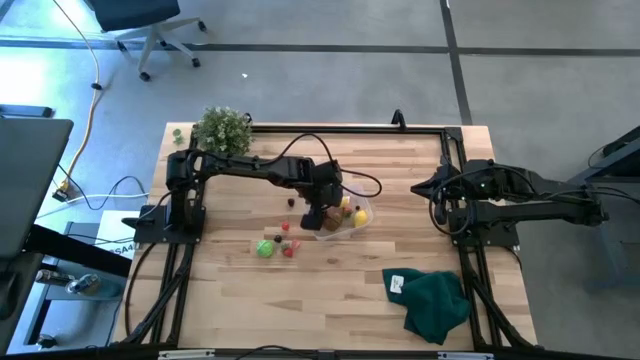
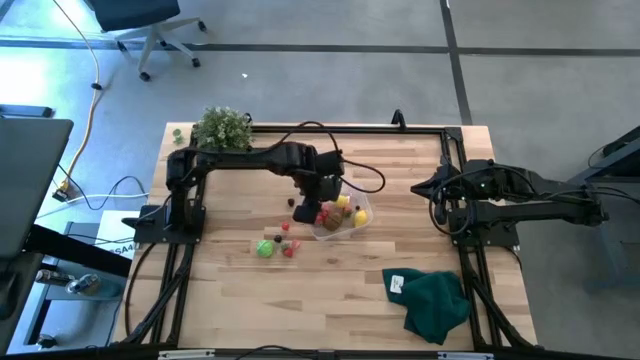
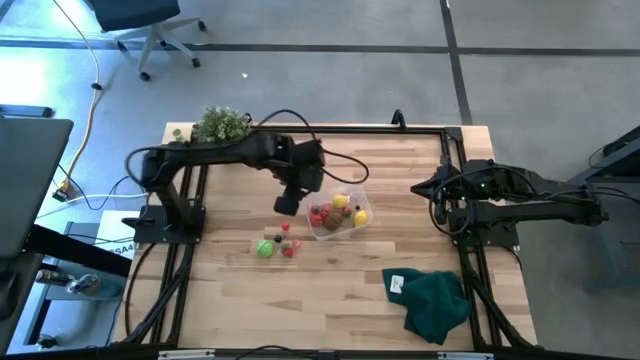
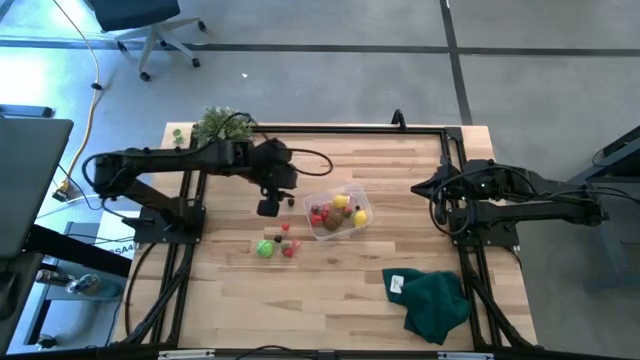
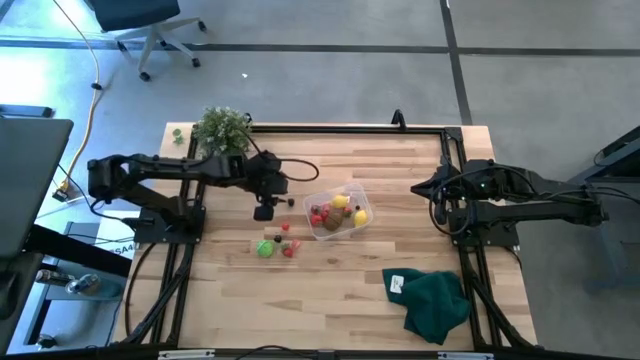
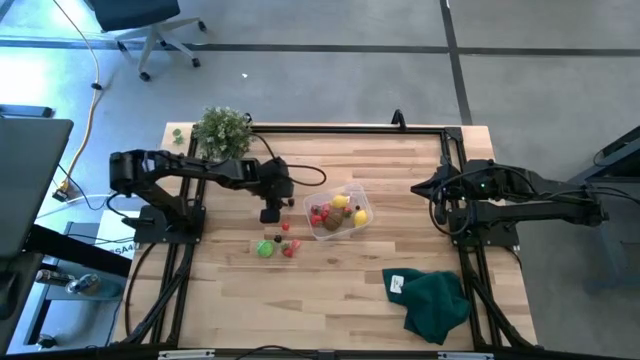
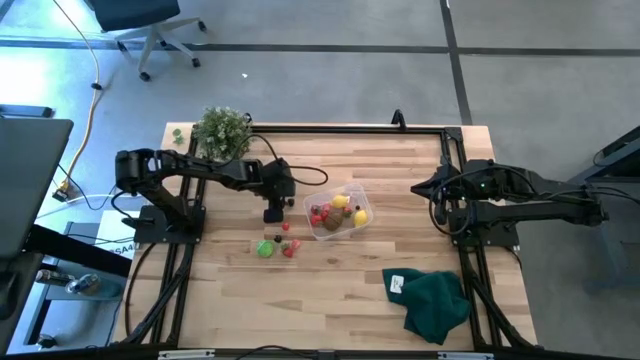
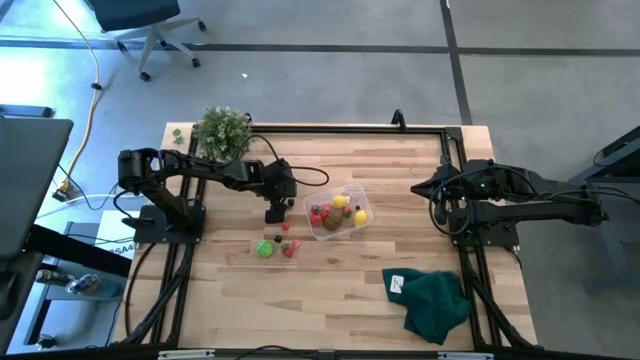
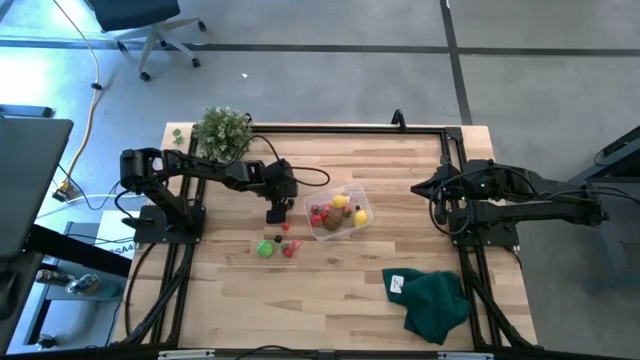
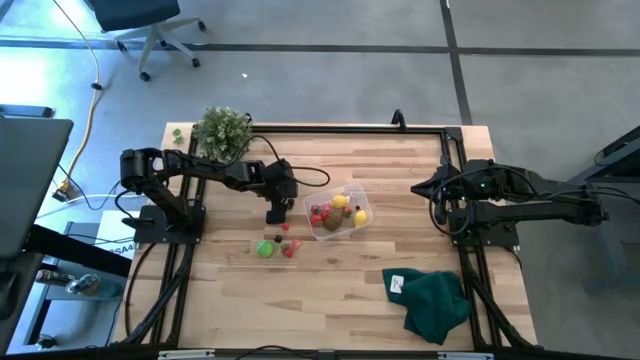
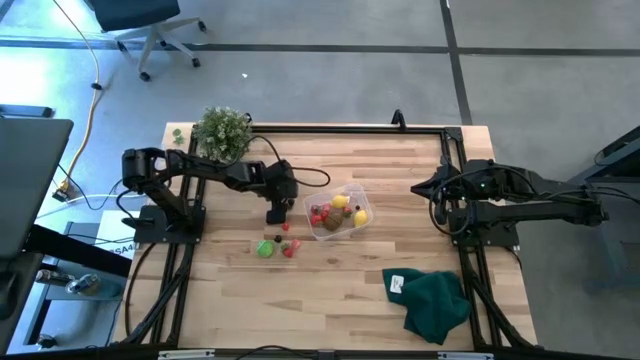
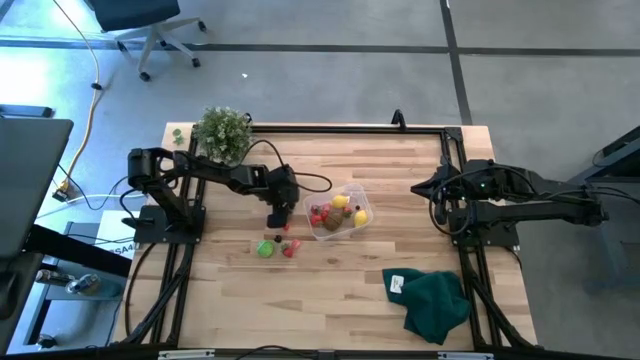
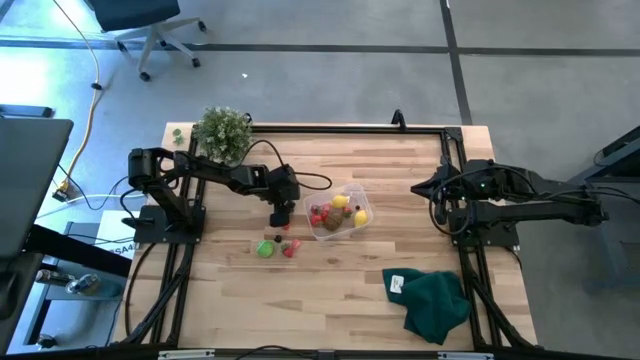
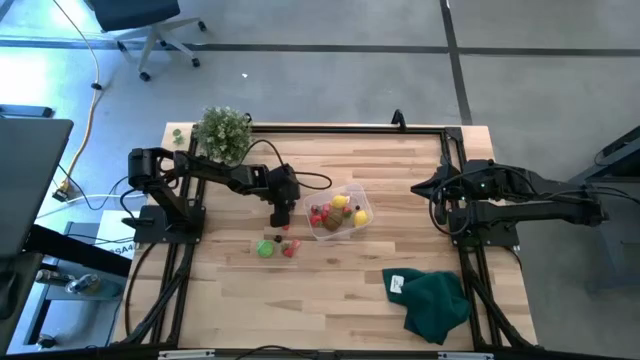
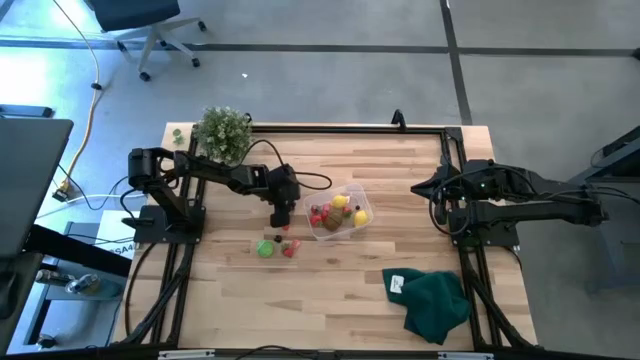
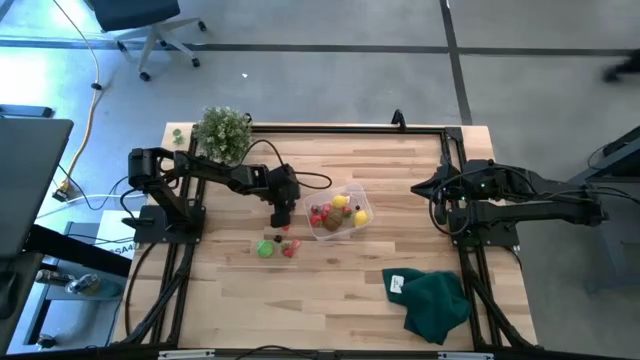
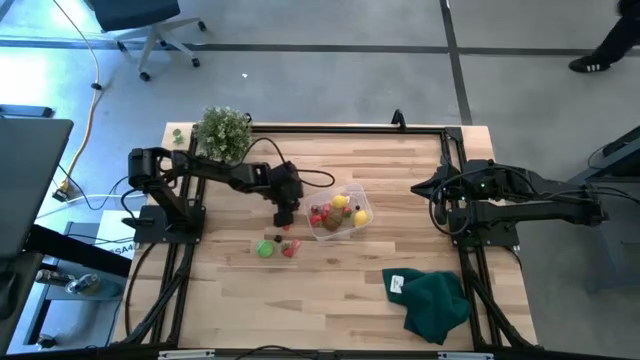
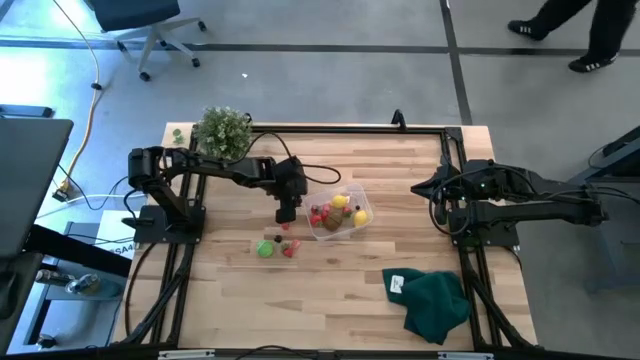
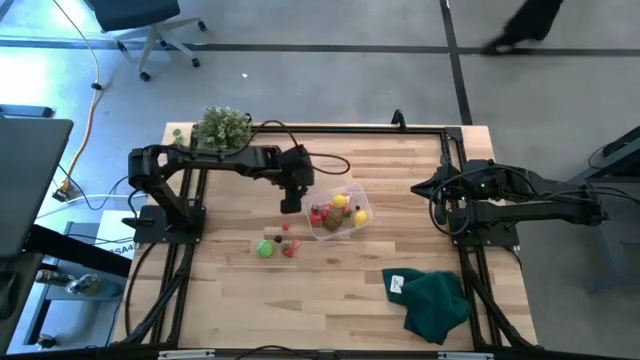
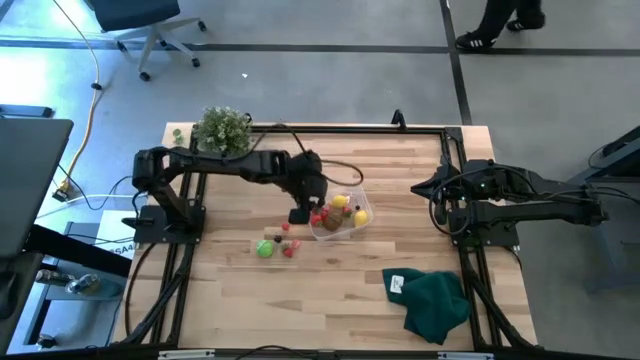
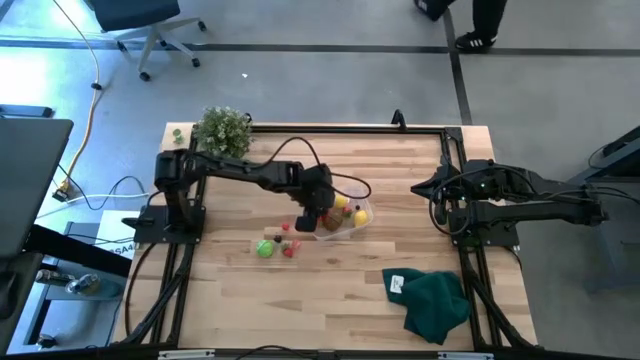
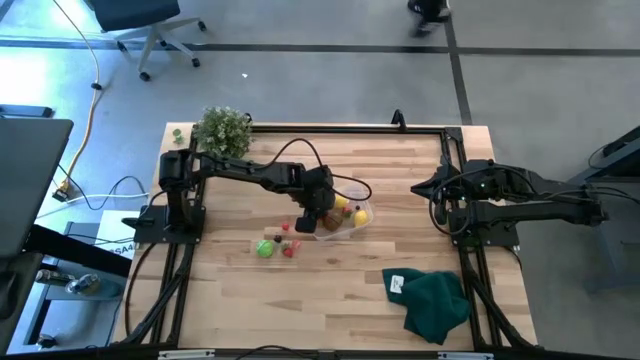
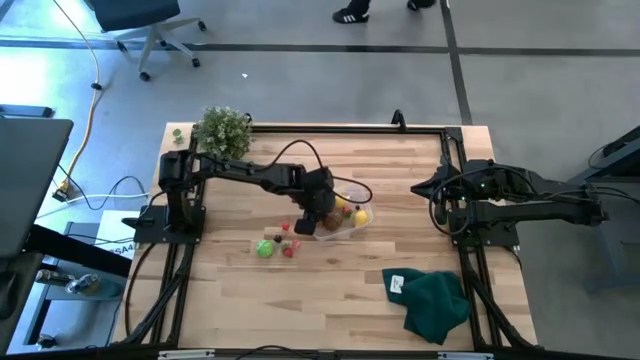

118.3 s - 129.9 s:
Task: Pick and placing Produce into tupperware
Put the blackberry into the transparent bin

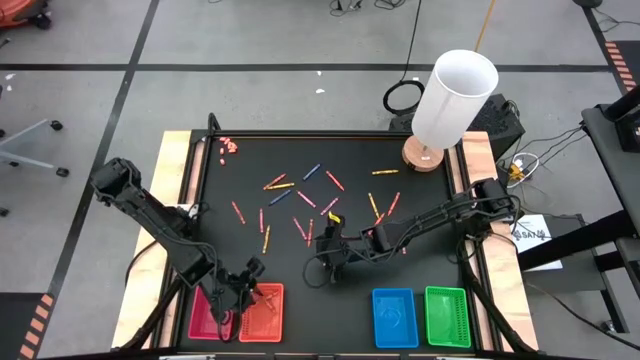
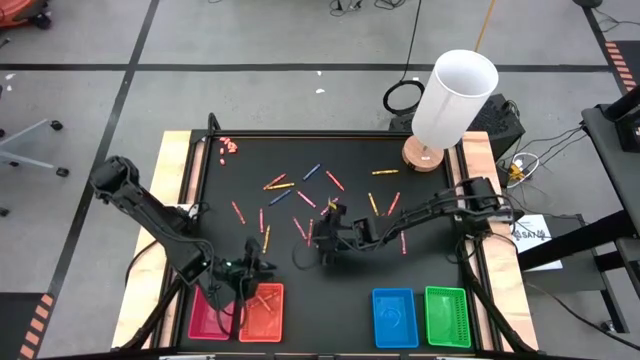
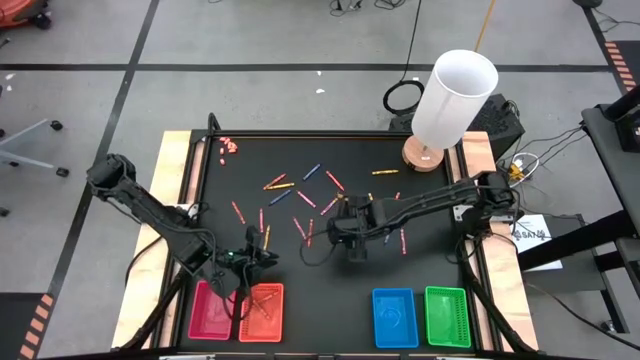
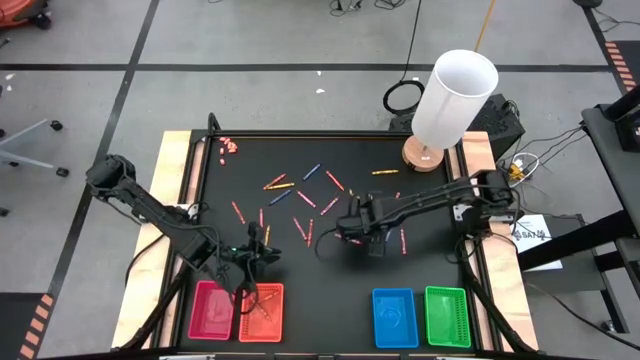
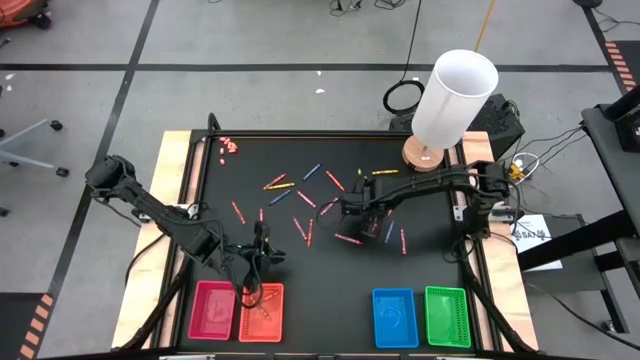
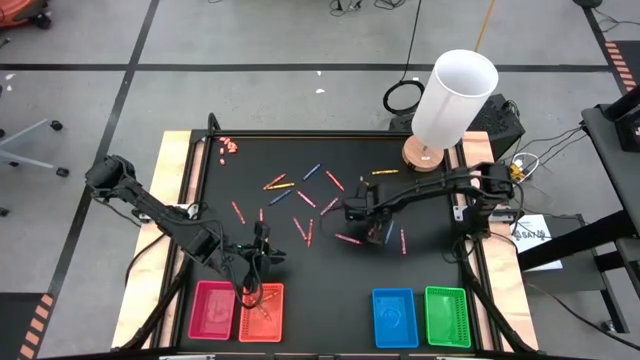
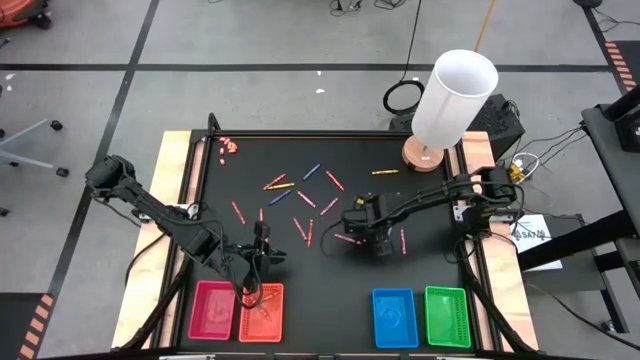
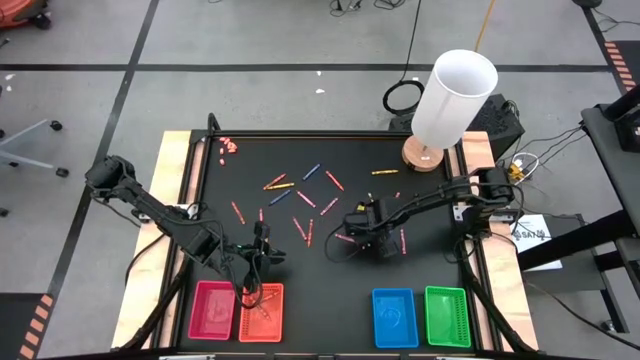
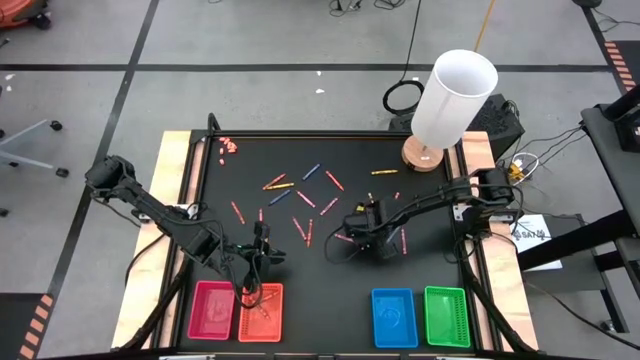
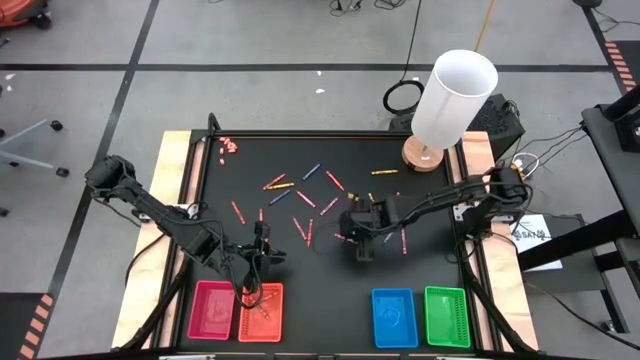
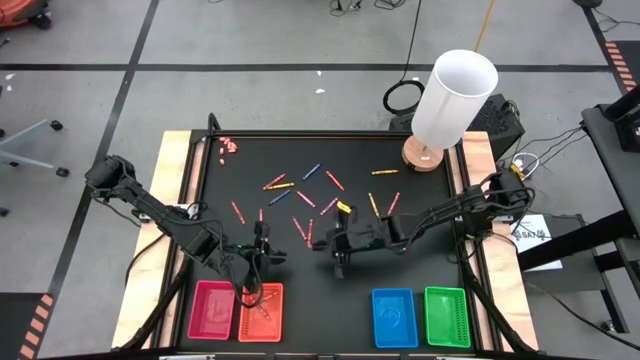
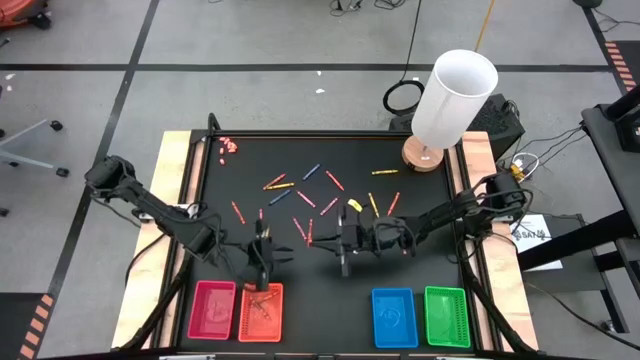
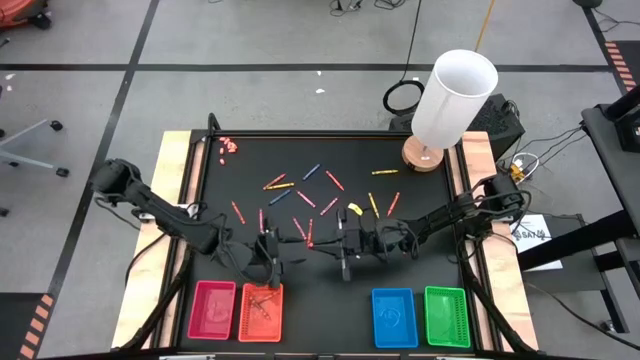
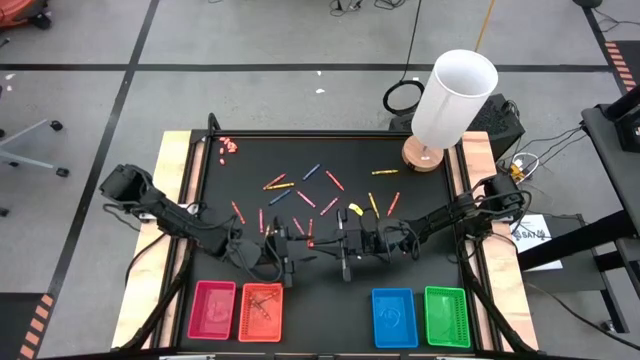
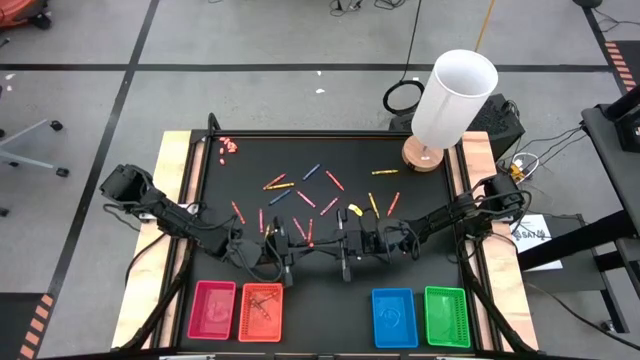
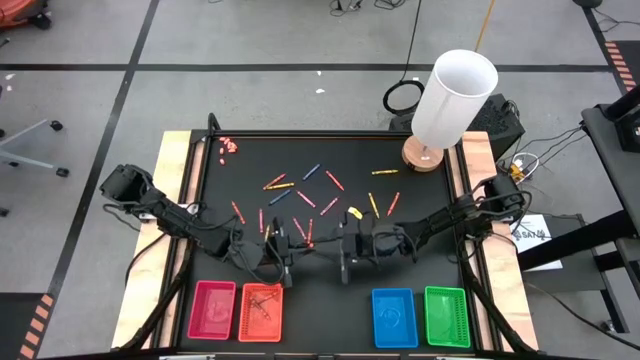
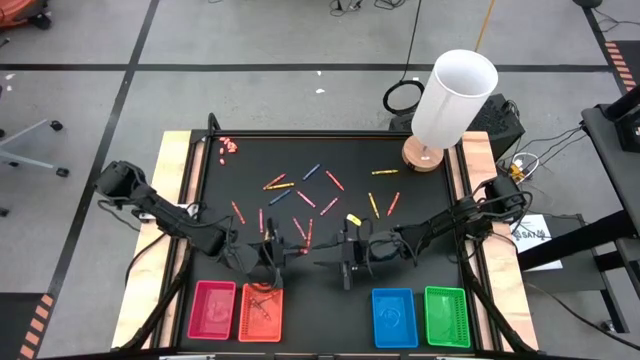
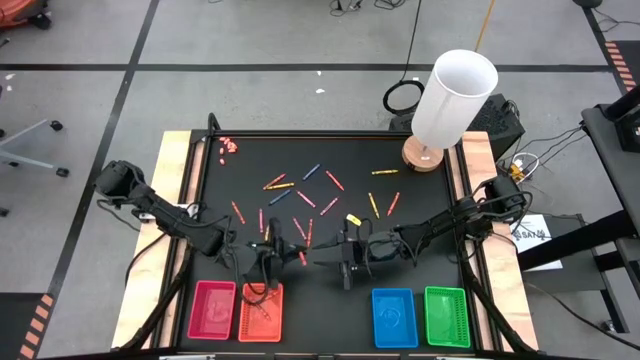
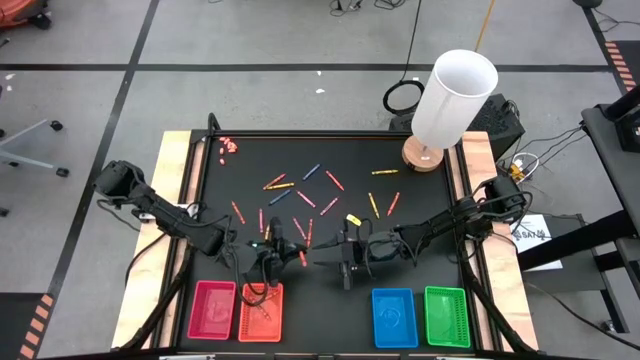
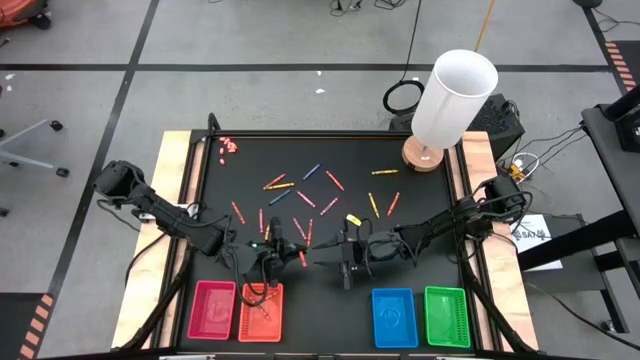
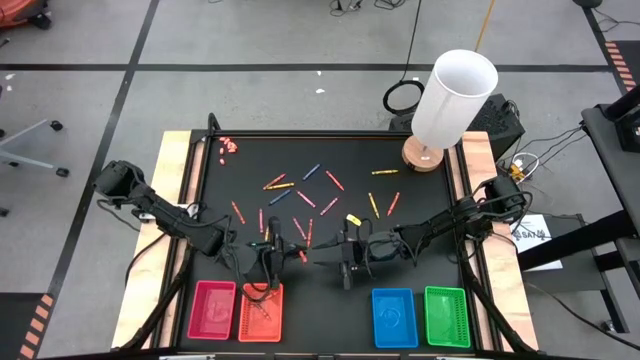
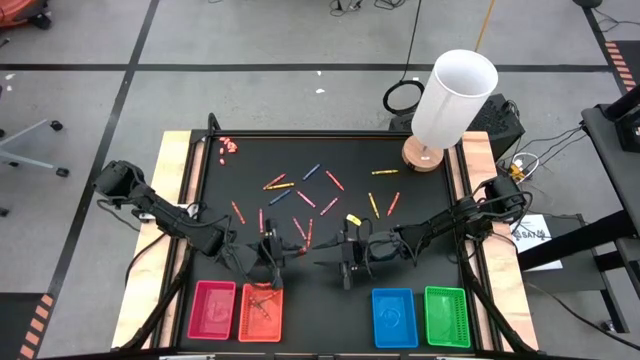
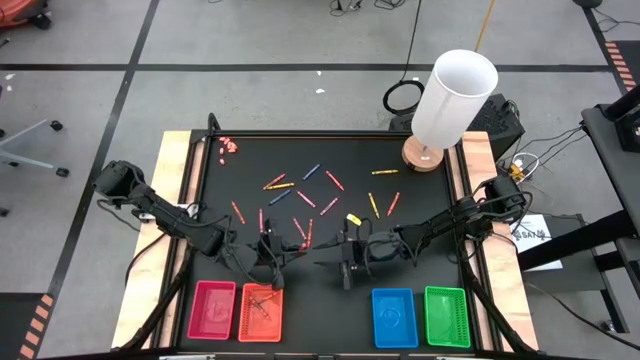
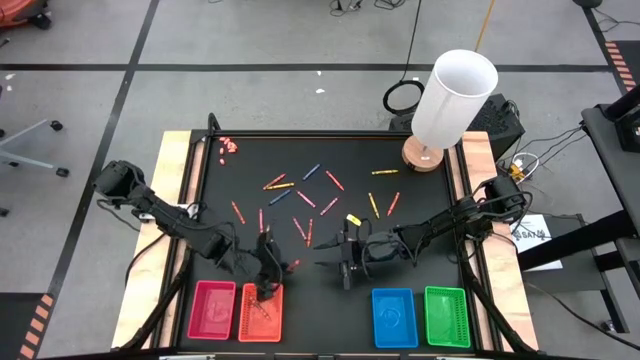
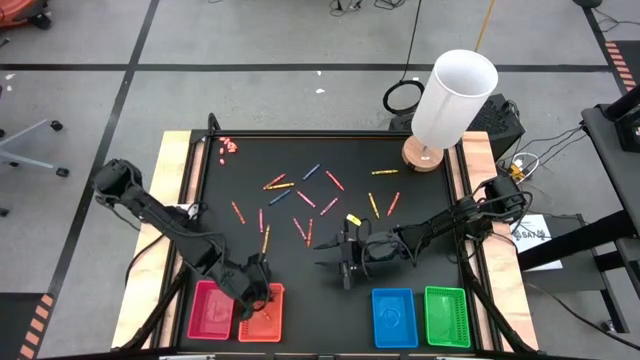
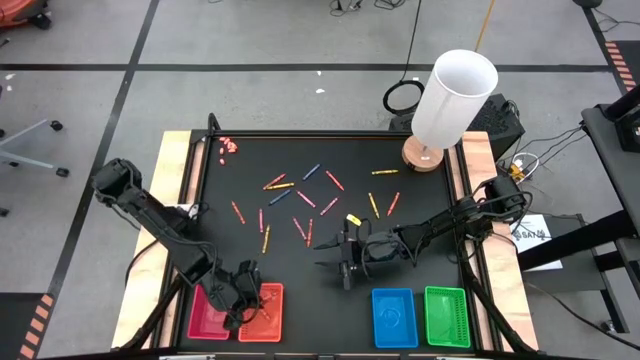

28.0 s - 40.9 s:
Task: Sort crayons
Put the orange crayon into the orange bin
